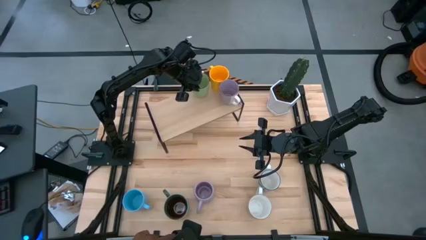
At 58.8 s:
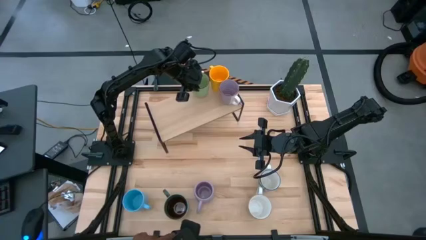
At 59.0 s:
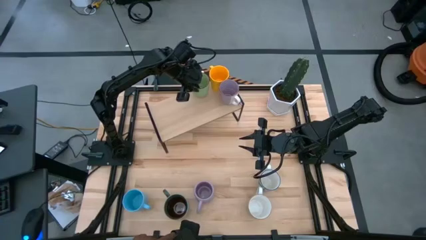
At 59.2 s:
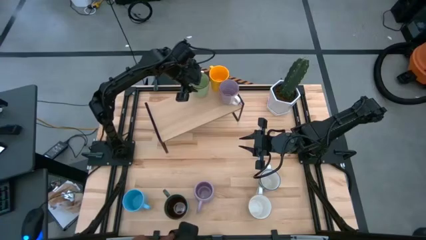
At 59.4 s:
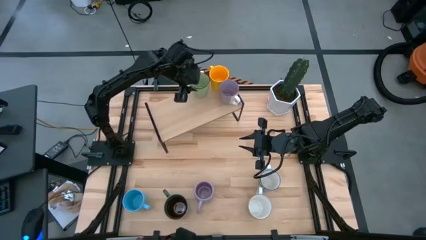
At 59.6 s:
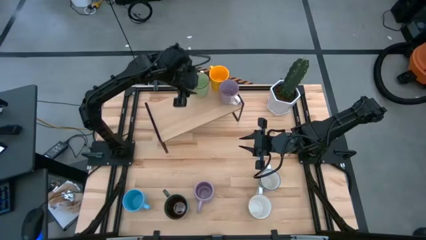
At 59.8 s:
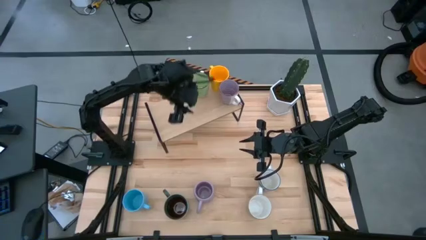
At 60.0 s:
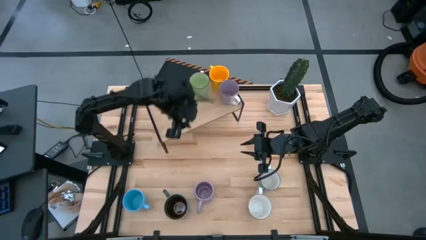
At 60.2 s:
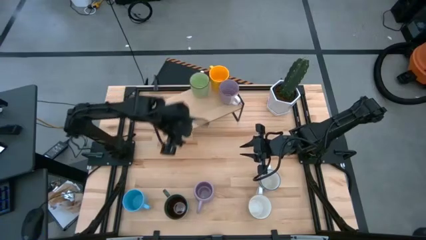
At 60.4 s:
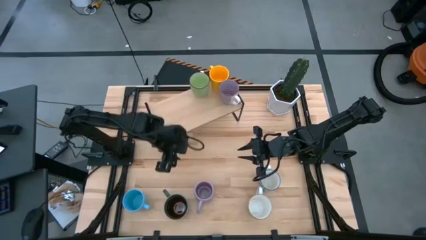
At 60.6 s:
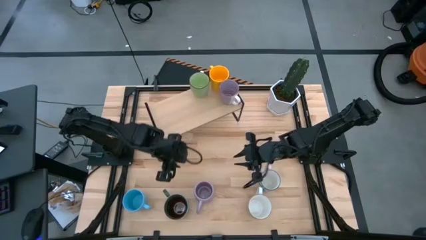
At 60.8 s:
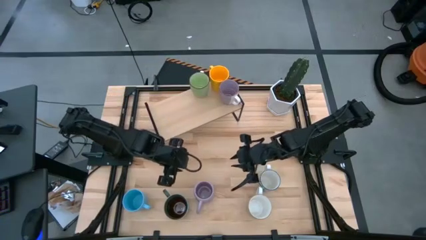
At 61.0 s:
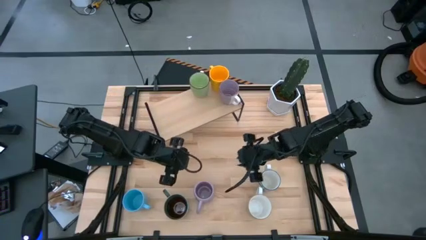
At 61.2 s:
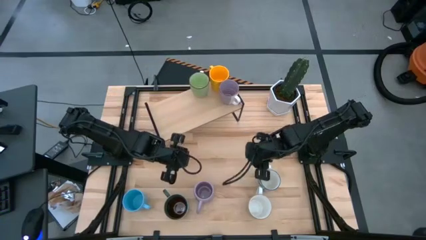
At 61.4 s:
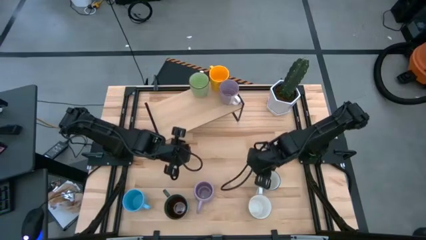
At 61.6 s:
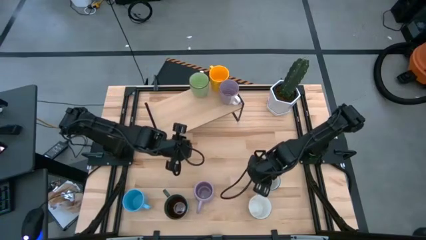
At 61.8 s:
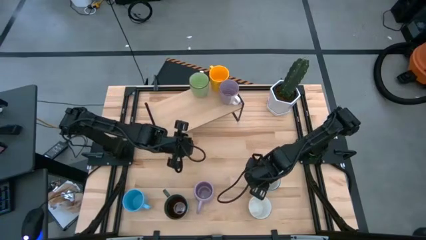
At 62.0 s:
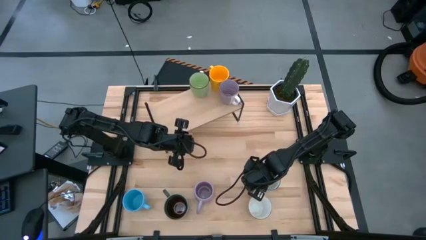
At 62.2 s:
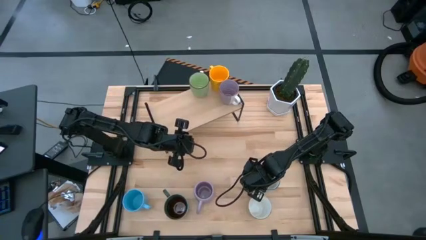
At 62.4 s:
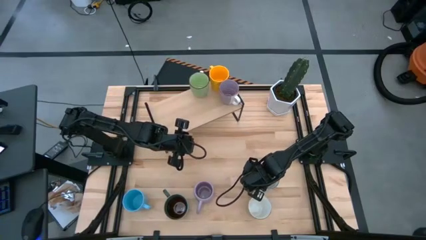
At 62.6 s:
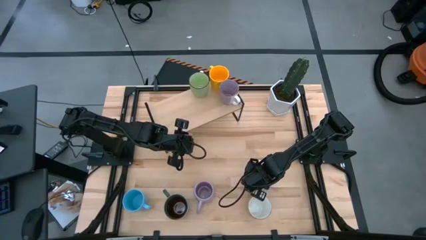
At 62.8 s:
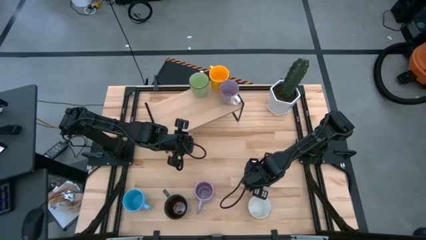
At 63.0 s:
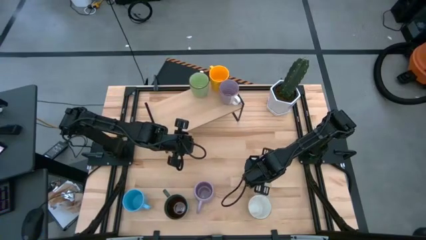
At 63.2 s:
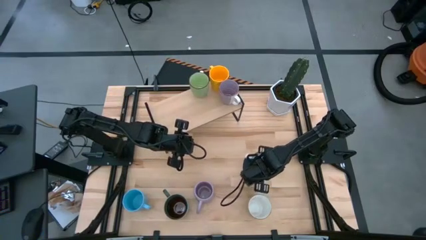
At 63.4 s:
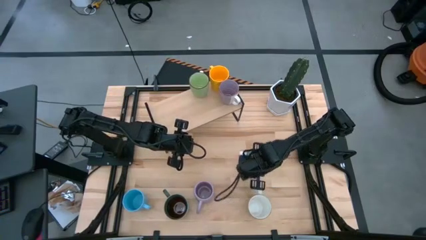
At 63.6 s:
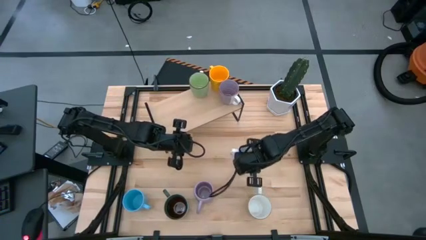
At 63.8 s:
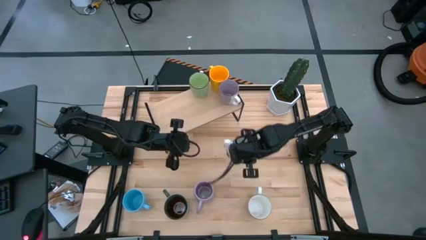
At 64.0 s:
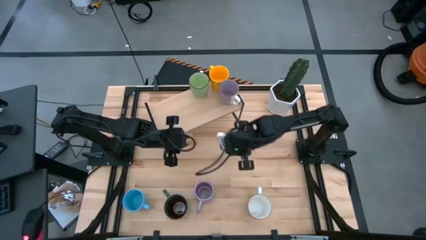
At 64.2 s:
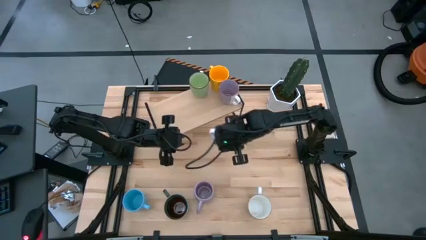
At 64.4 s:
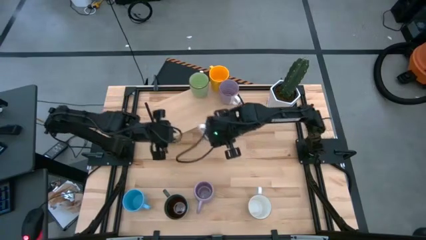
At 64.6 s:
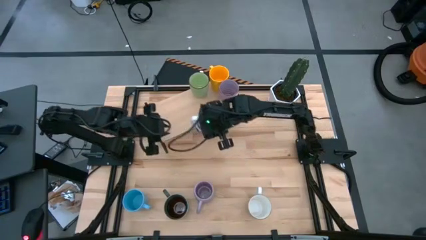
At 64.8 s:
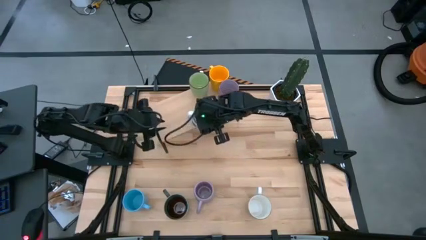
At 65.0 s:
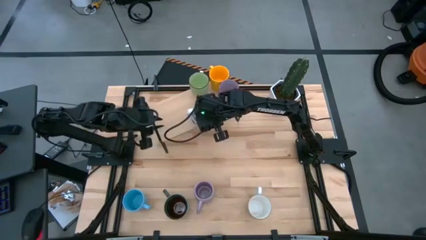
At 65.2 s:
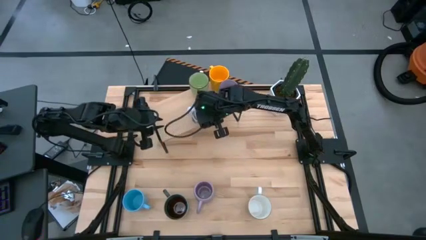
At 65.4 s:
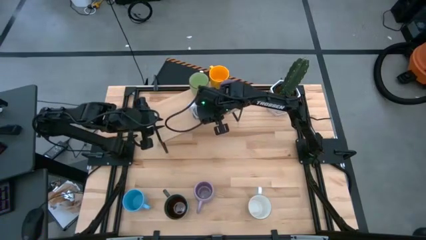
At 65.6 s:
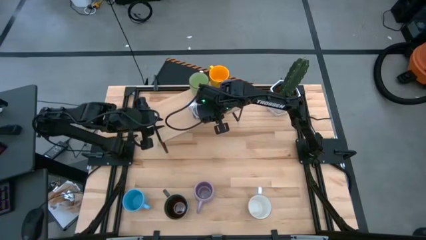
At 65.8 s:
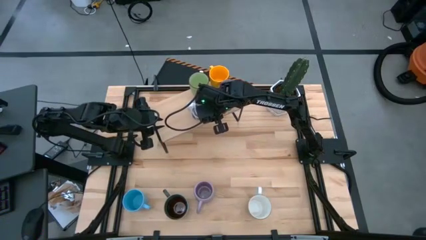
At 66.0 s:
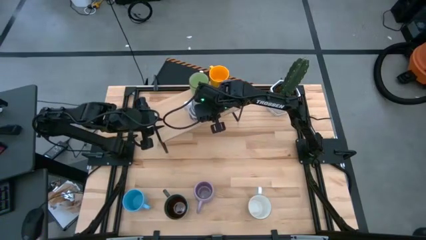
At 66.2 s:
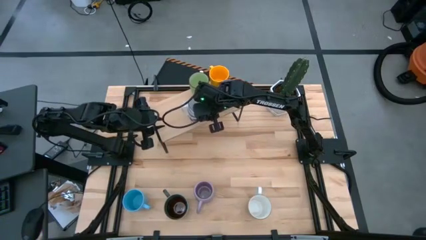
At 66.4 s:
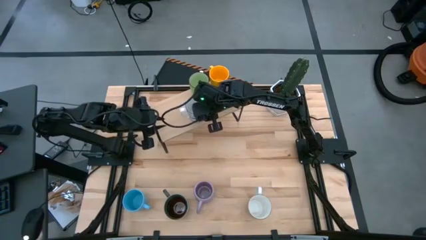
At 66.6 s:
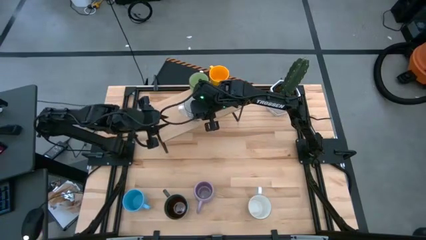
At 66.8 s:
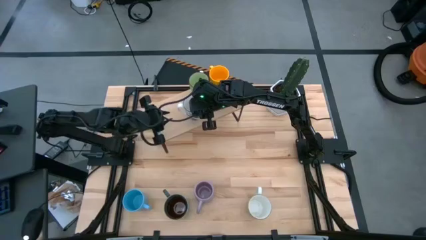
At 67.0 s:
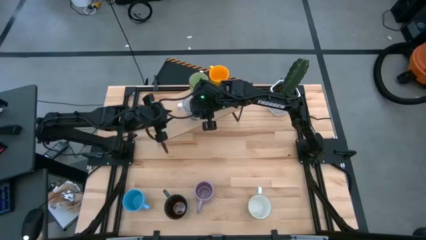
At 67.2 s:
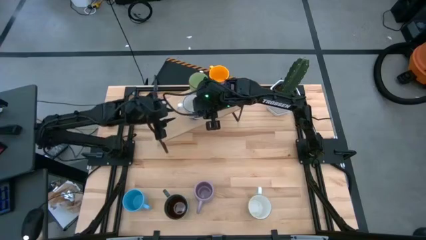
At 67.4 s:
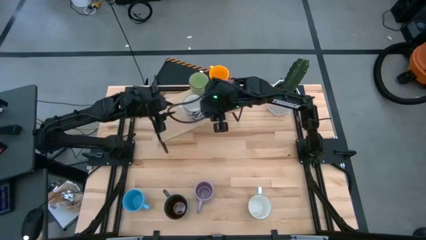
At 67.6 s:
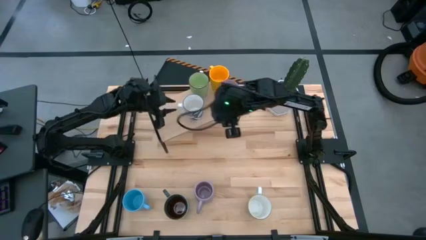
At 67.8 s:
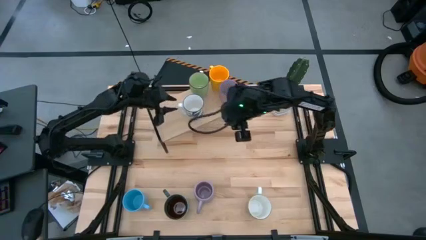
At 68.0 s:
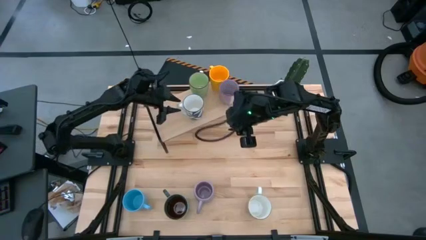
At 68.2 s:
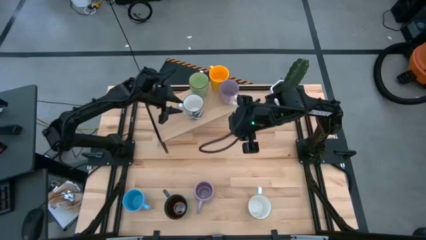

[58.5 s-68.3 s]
Task: Place coffee mugs
Put the blue white patterned mug on the shelf

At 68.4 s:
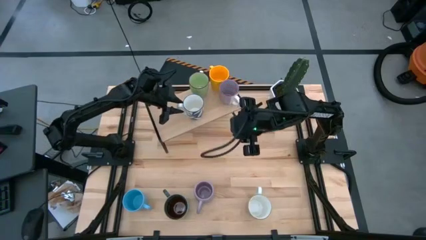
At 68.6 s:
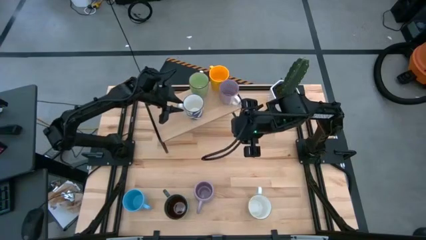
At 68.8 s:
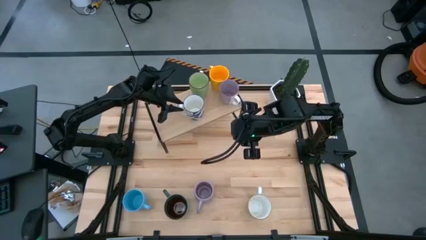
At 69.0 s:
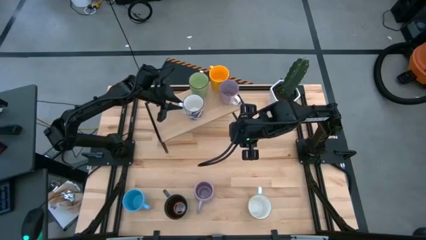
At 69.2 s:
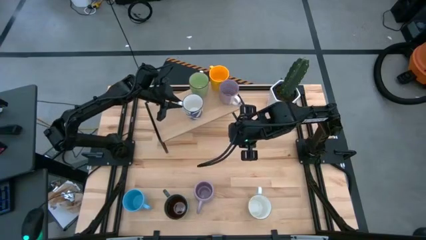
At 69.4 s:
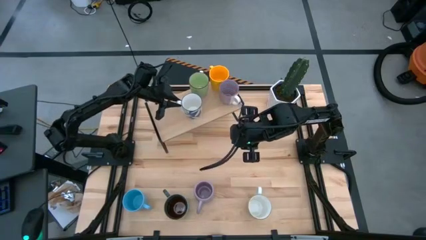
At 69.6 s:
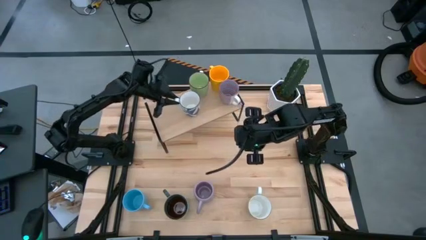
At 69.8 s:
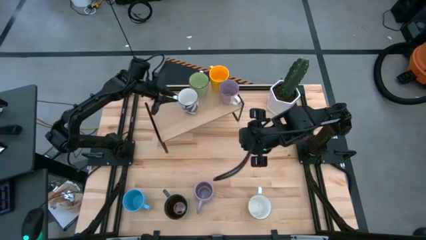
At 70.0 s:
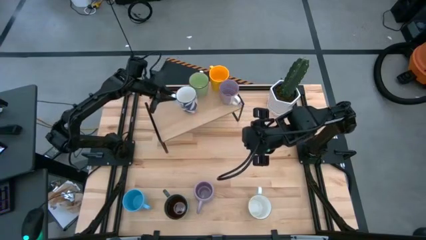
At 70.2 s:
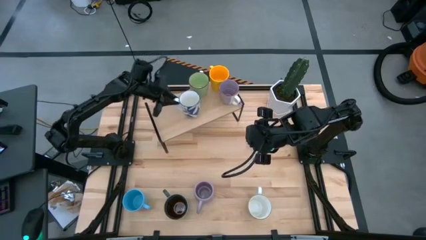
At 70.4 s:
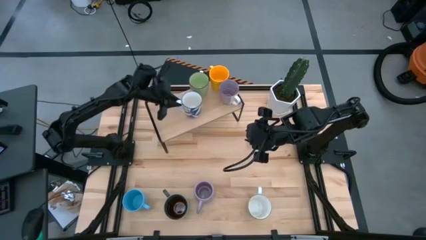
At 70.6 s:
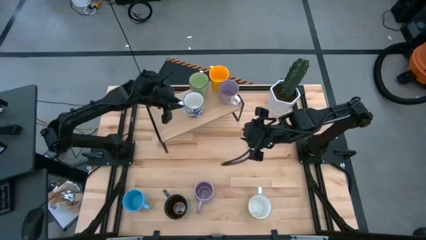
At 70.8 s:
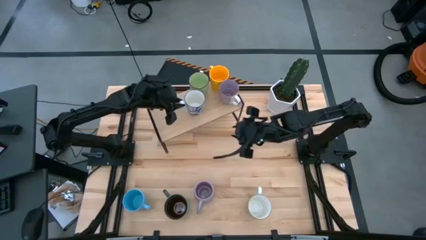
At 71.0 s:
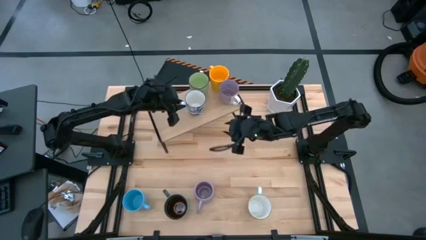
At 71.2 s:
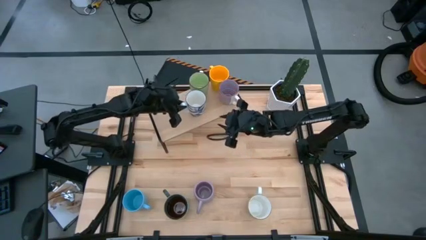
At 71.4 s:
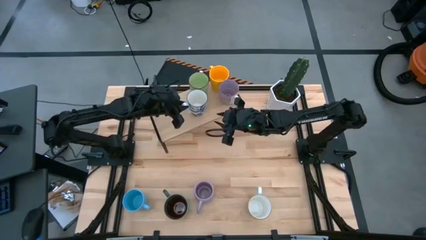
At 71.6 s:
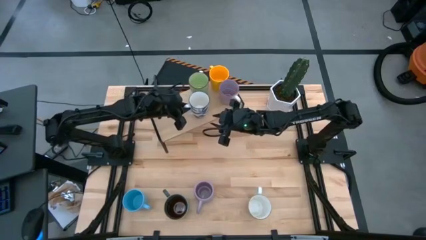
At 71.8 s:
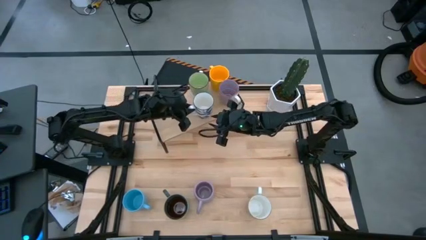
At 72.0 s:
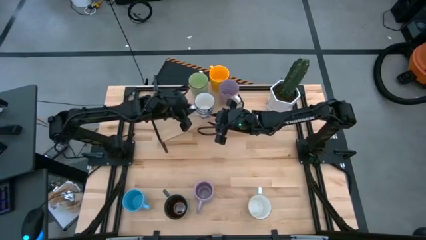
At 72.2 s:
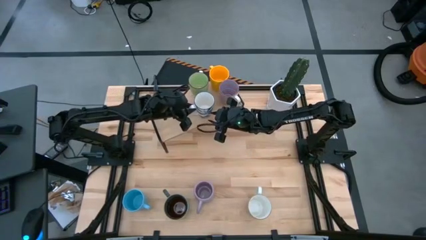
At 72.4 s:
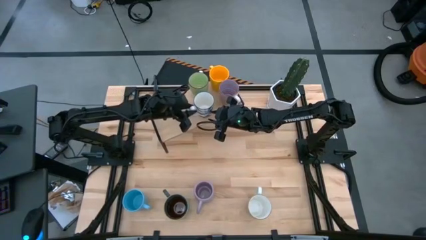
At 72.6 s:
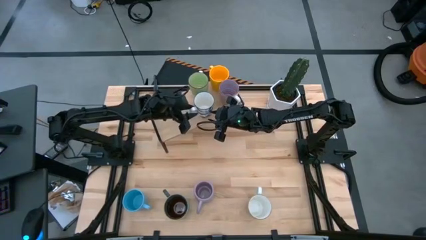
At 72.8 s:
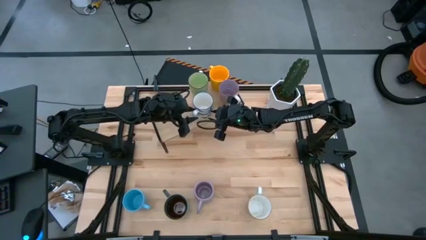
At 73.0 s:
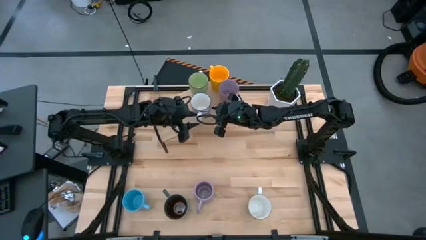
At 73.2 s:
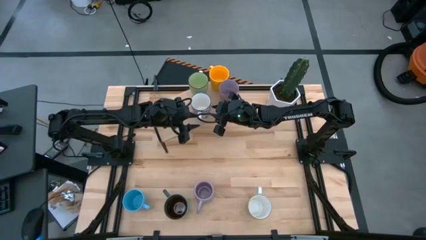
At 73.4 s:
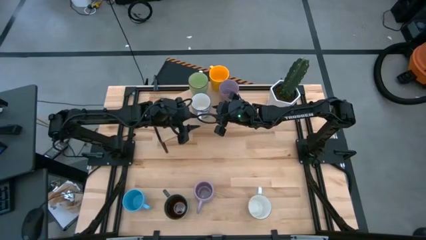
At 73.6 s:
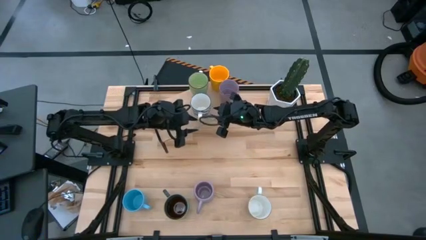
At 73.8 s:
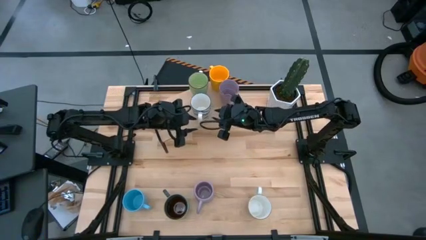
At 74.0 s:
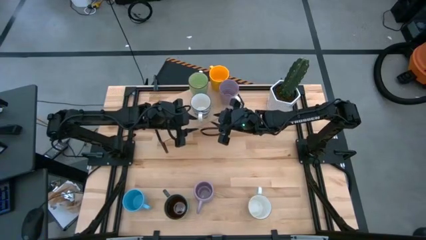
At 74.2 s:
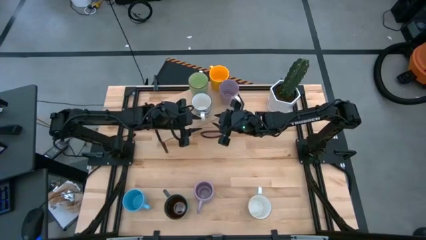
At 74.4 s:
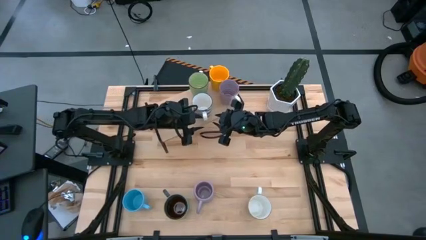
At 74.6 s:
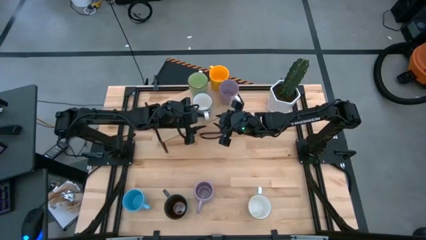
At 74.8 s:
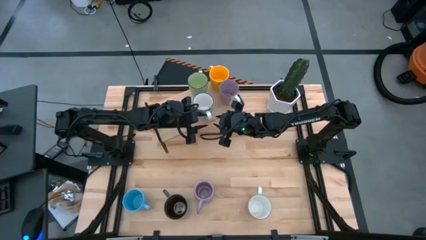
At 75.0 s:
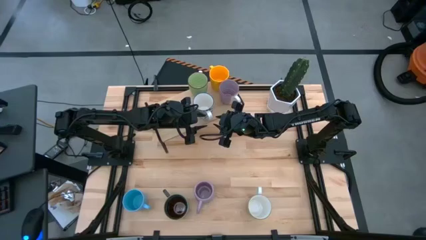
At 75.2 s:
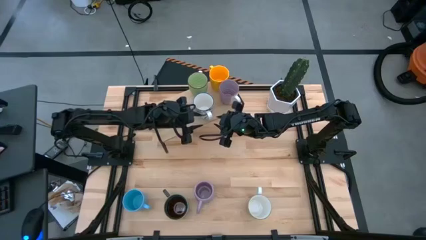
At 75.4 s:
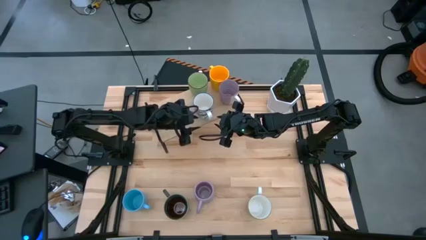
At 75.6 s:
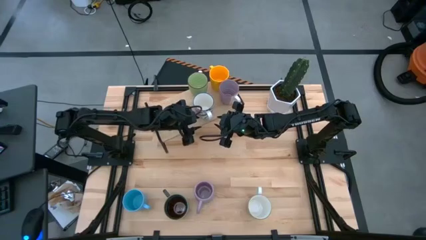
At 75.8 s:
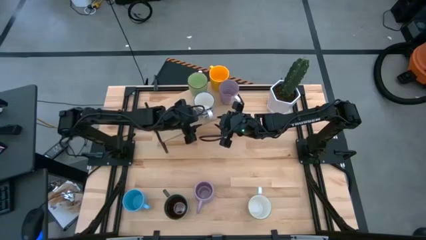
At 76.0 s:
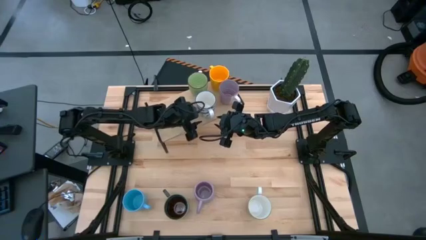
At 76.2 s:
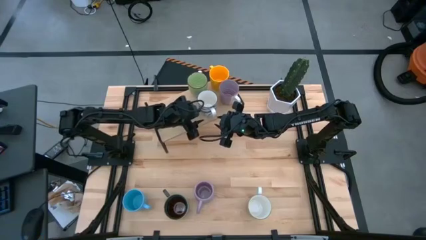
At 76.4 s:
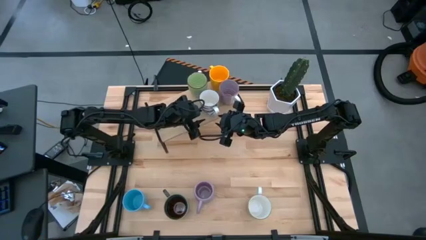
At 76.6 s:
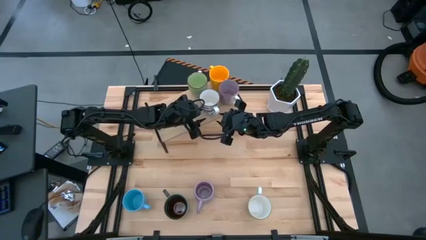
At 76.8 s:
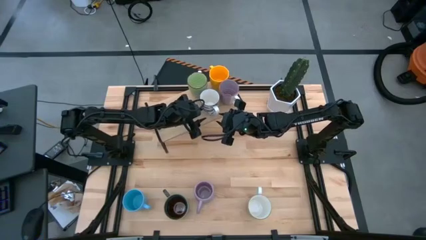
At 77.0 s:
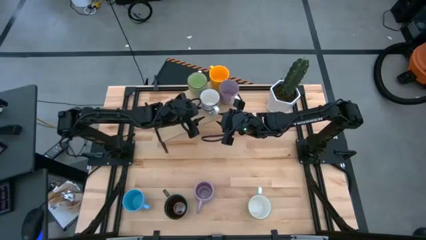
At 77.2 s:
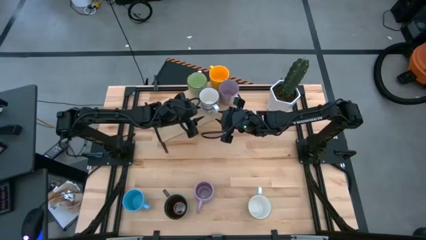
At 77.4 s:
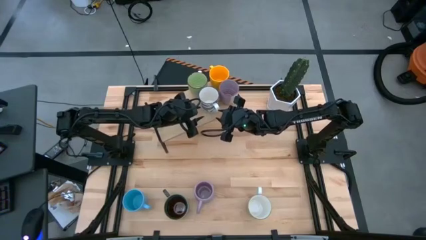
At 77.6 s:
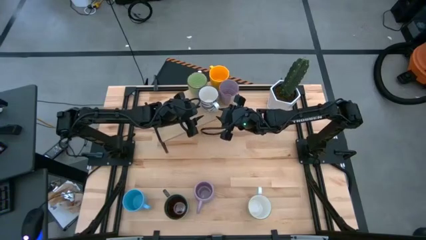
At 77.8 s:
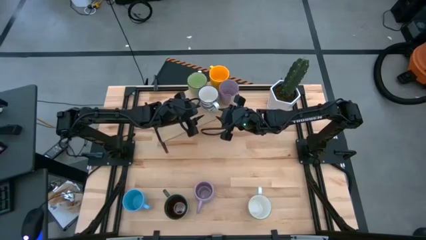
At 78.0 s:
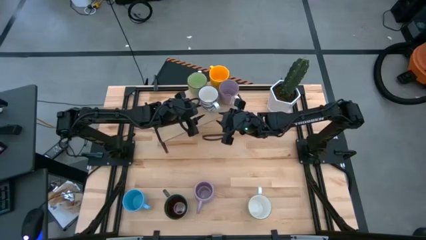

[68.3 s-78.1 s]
Put the blue white patterned mug on the shelf
